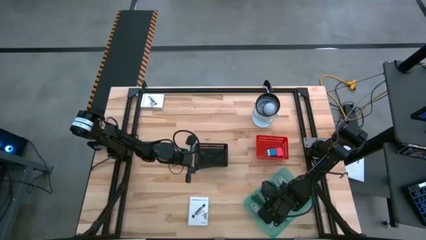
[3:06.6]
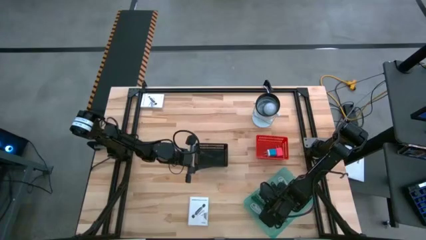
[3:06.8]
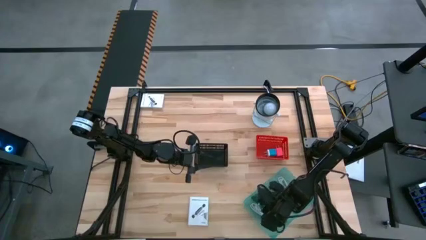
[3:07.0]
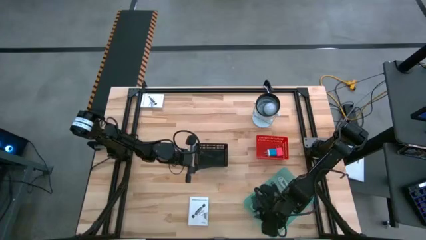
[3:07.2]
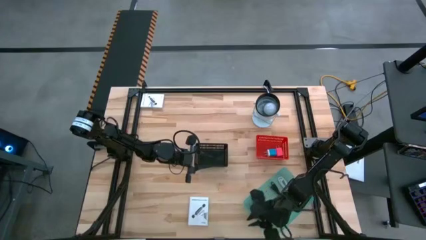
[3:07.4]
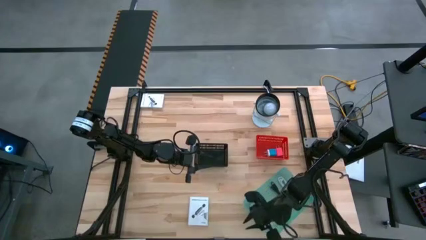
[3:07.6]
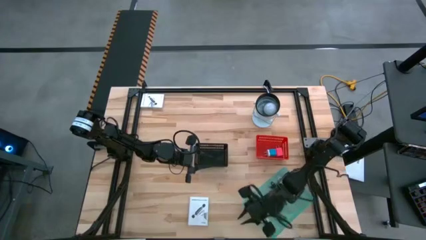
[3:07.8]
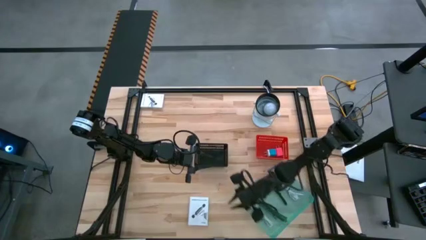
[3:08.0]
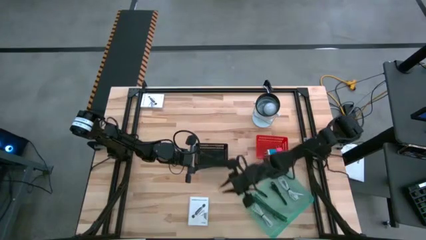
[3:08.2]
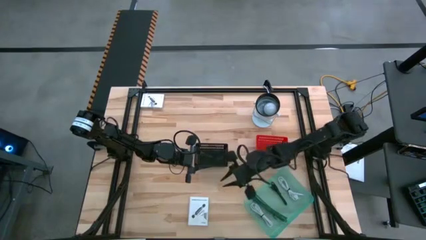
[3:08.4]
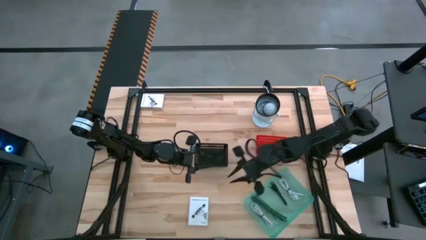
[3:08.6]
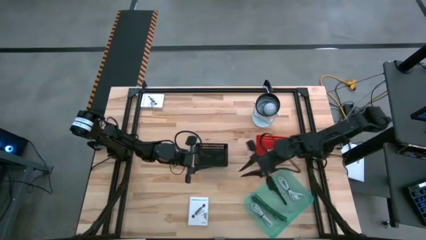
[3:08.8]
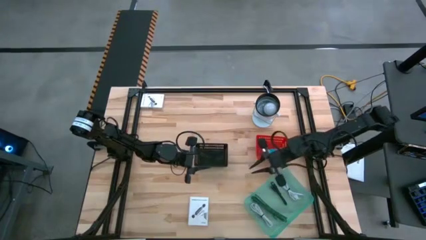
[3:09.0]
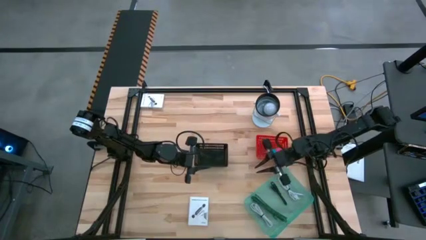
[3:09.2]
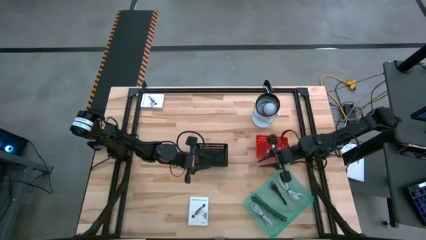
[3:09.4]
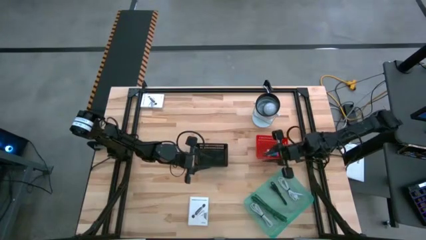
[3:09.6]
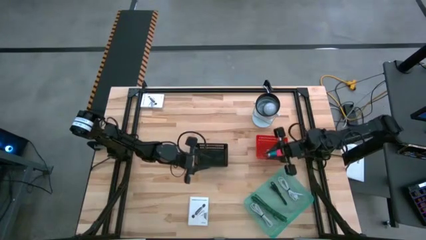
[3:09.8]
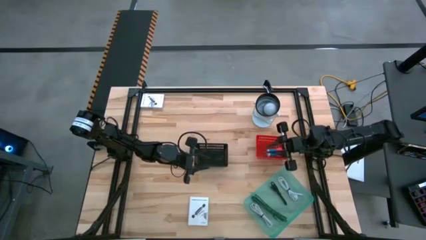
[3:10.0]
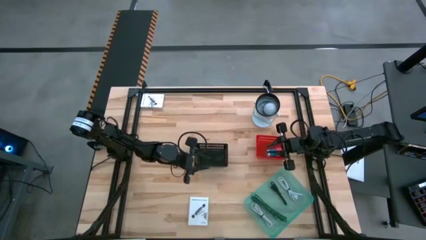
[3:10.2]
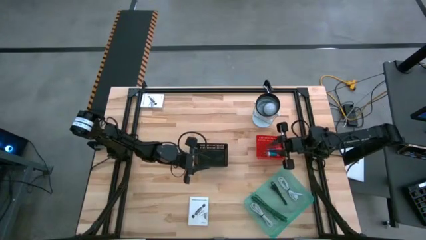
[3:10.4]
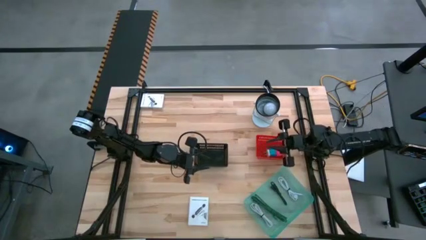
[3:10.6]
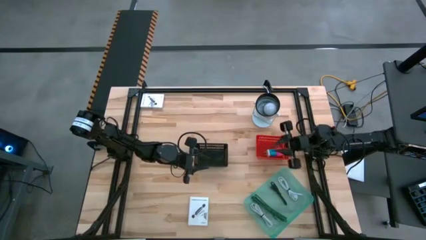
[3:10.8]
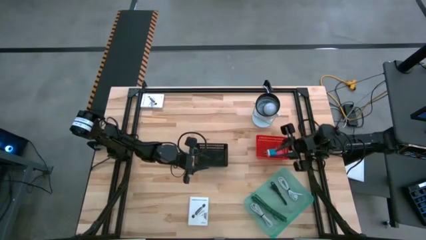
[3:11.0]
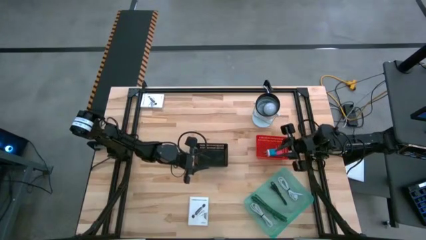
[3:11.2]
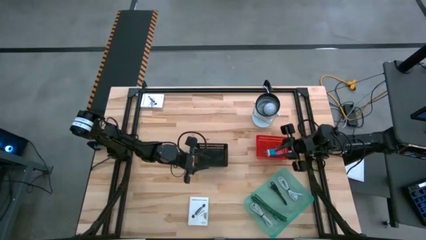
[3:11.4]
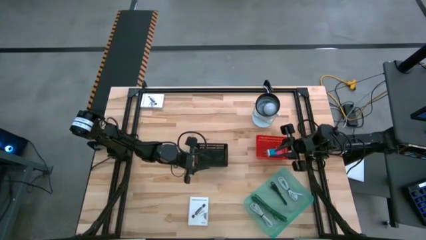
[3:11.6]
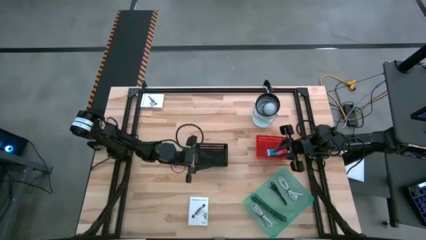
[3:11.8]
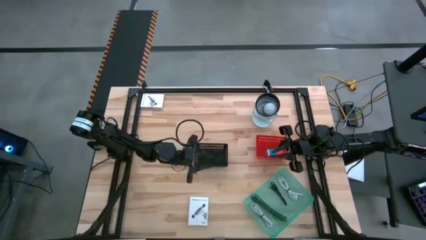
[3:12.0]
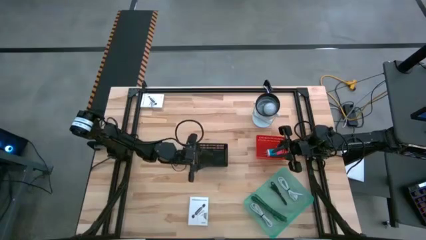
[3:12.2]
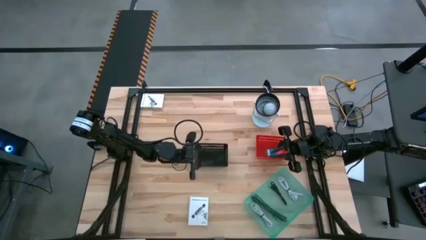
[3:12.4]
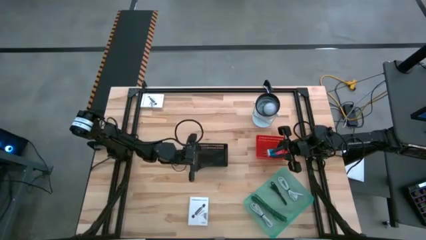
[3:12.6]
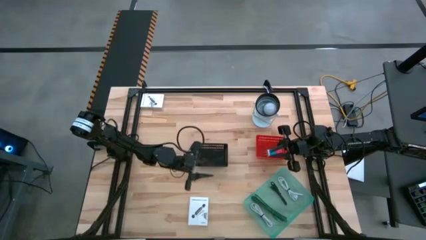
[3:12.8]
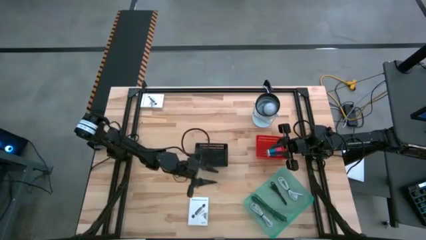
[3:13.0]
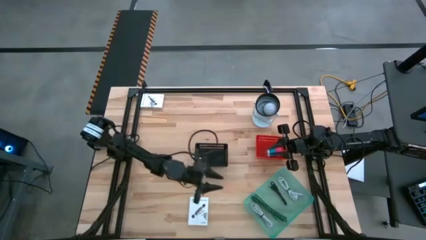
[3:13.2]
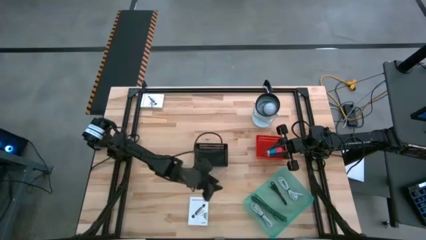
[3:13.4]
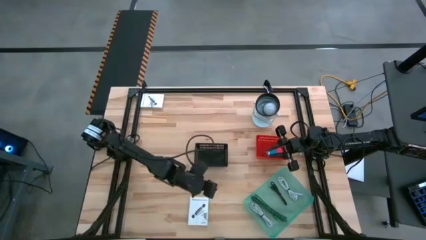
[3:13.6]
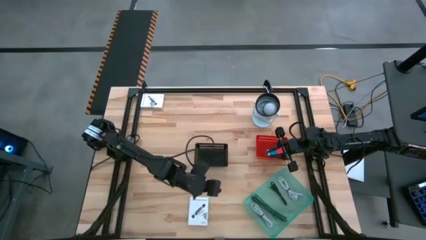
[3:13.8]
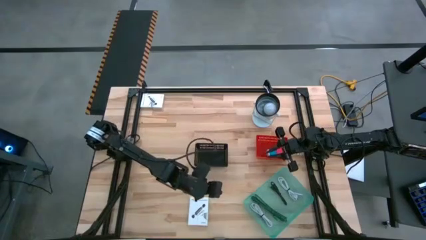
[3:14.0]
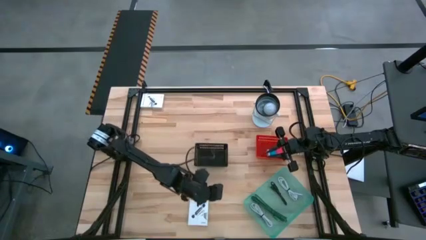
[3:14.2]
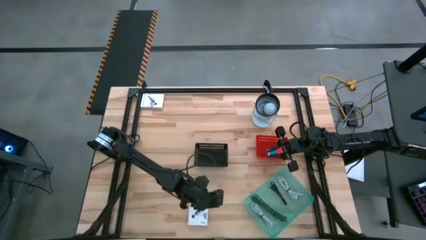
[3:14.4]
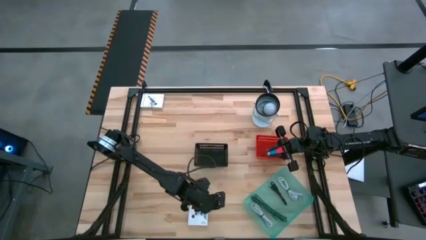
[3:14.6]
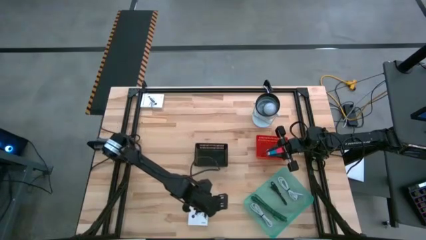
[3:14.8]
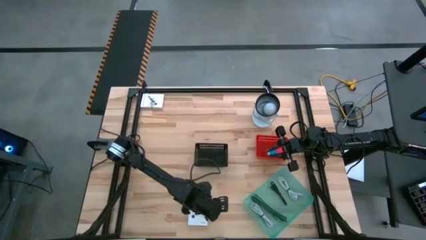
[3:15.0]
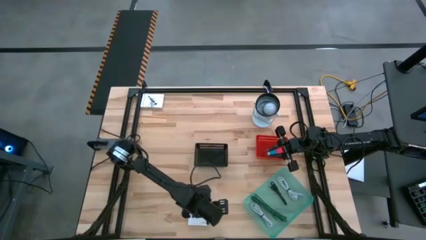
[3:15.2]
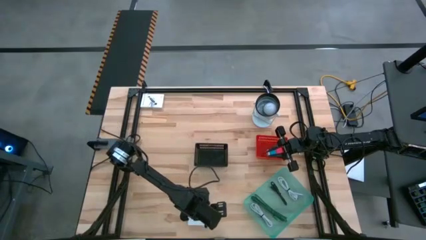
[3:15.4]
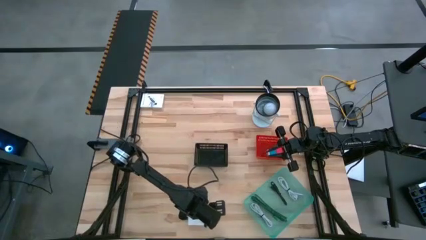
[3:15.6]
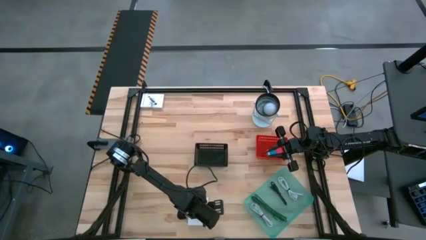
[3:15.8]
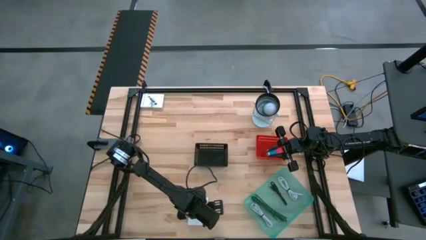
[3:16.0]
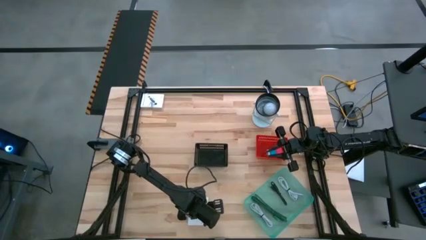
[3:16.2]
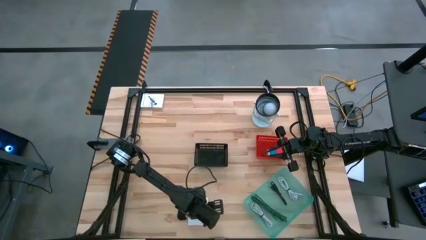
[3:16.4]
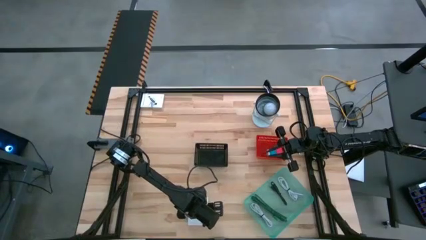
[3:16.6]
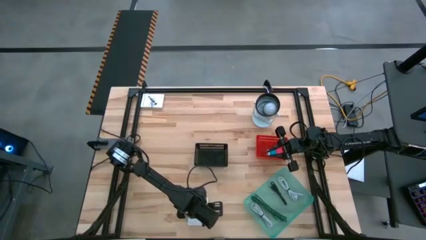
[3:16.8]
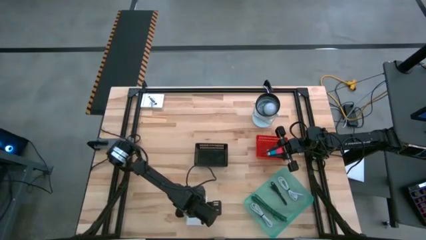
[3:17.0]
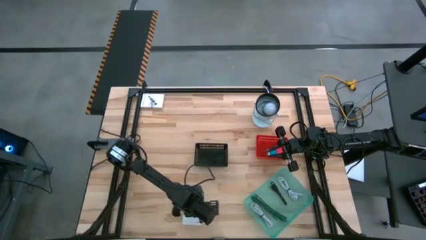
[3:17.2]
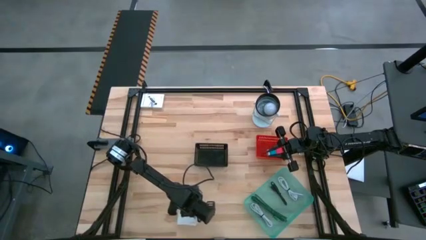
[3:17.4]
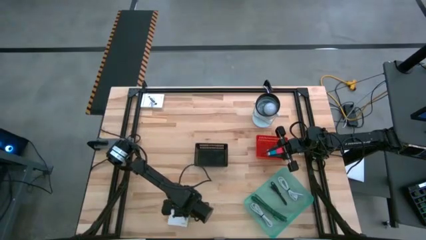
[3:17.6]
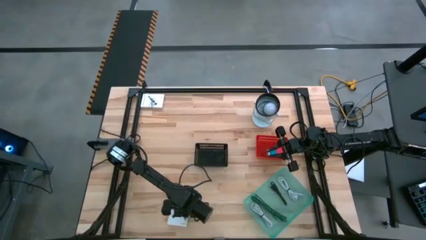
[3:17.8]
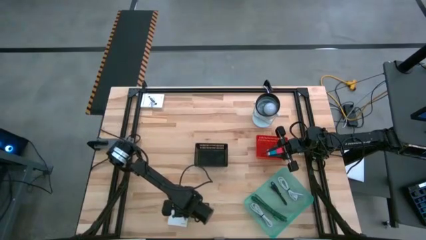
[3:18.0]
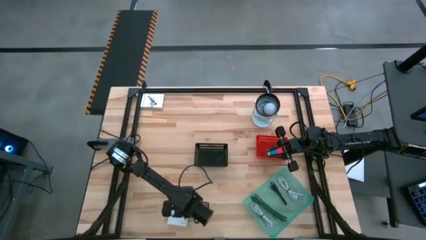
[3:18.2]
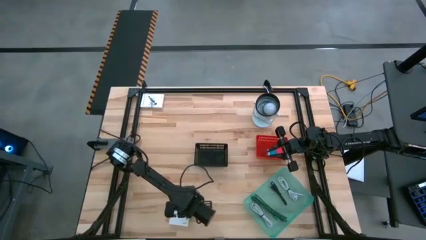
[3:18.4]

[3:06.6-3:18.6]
Task: Pick and place items into bin
Put the bottom white card reader box into the black bin

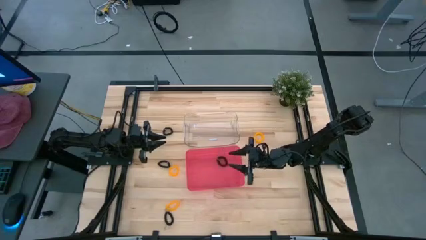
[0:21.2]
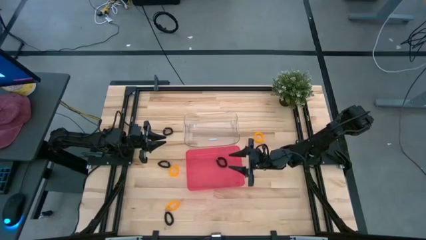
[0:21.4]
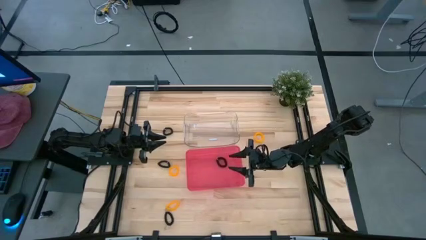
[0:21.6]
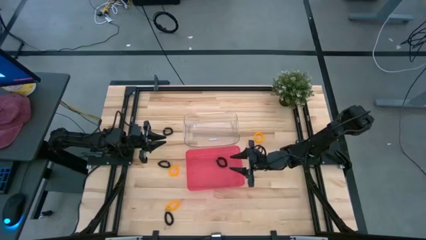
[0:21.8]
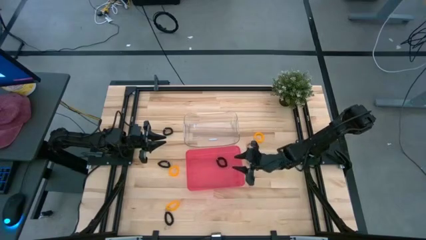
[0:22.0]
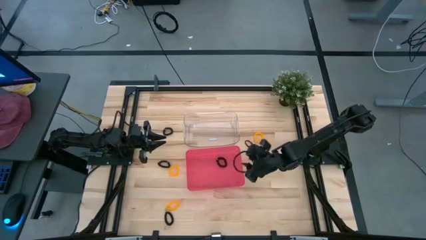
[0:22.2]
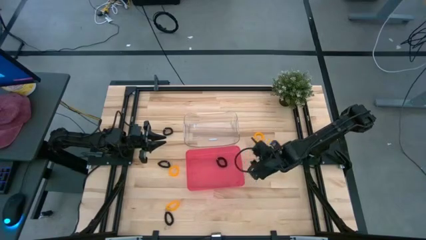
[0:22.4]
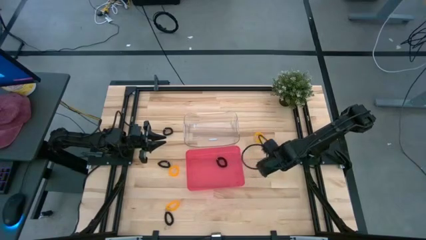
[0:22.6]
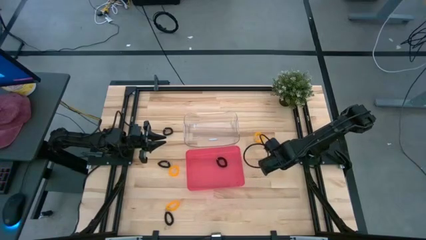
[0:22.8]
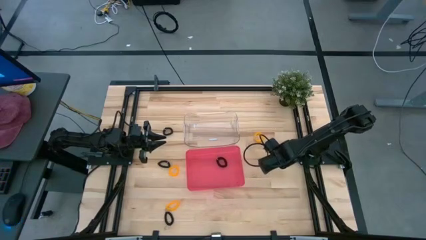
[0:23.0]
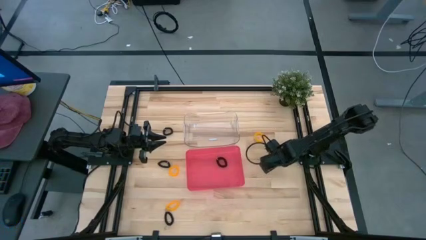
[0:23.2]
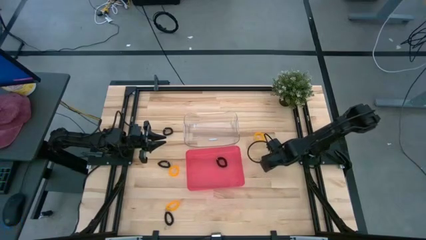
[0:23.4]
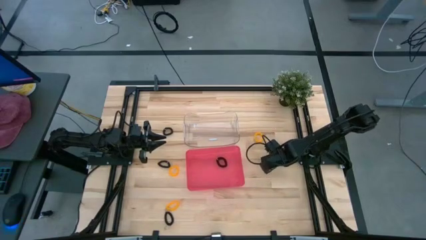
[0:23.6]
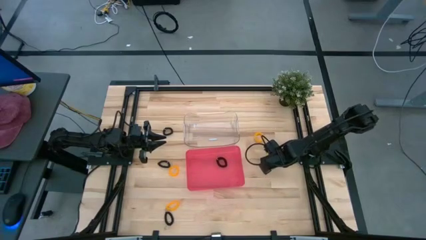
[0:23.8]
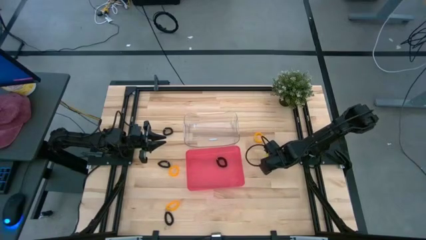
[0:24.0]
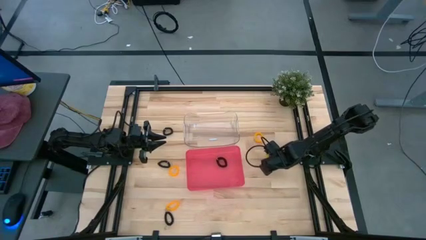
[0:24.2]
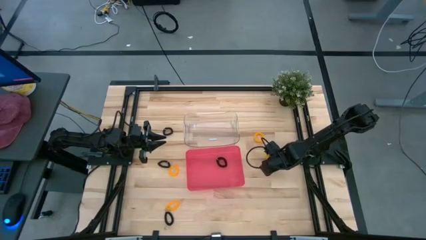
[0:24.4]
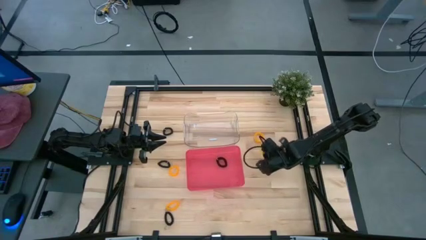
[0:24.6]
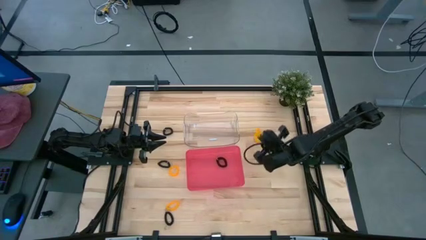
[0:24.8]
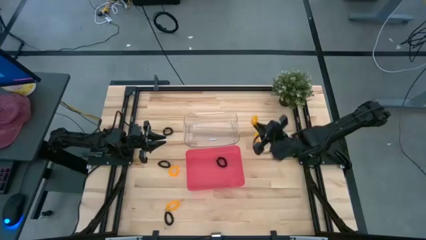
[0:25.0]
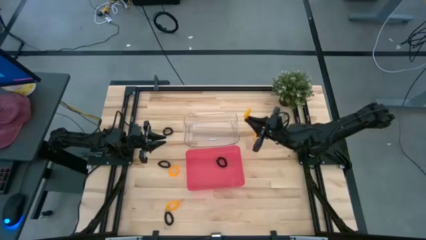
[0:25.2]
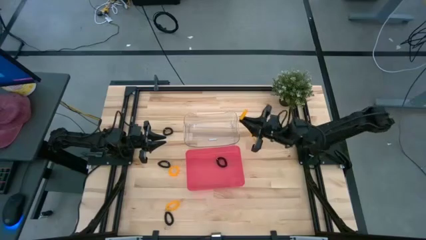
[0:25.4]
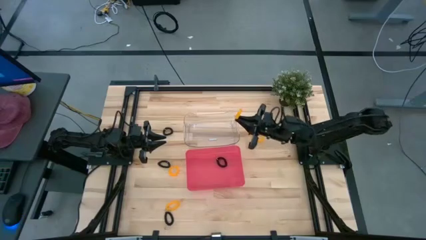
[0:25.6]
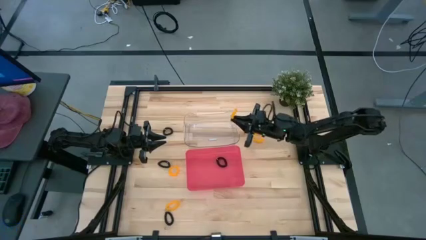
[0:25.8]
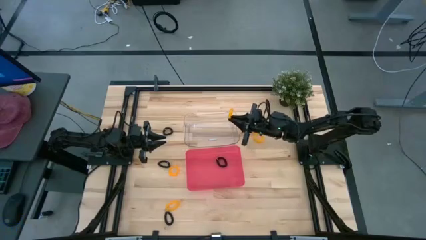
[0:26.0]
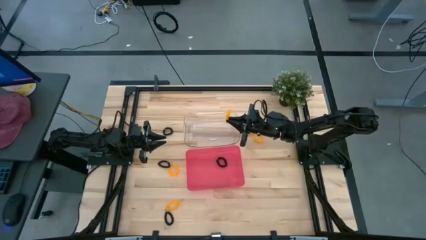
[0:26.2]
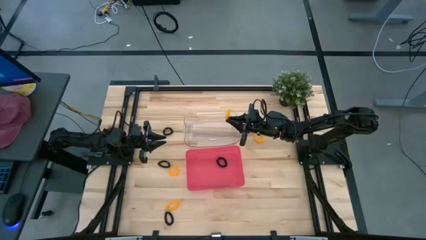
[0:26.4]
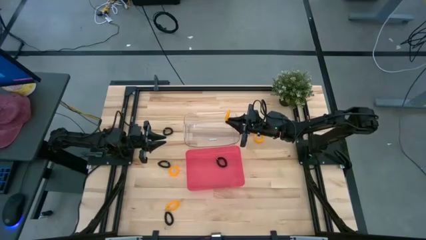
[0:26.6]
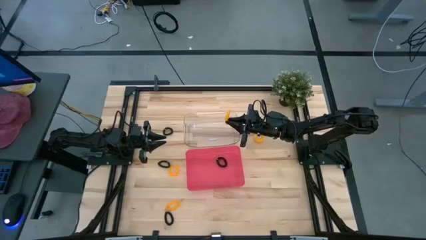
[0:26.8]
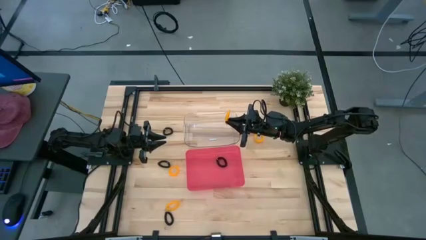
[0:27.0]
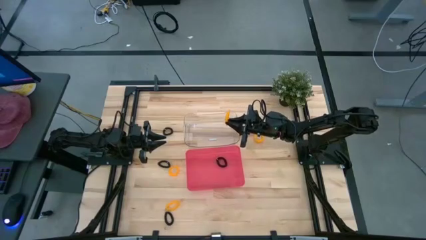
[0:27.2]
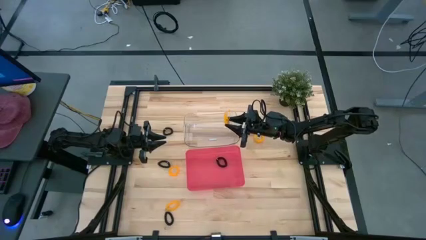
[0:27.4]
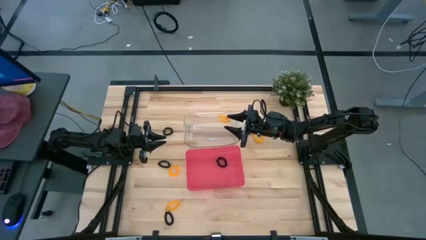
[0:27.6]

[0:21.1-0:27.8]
Task: Sort spring keychains
Put the yellow spring keychain into the transparent bin
